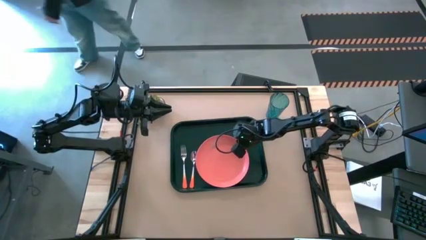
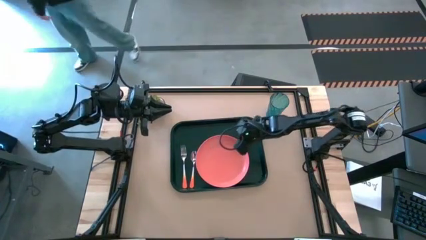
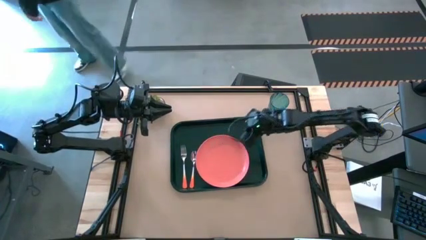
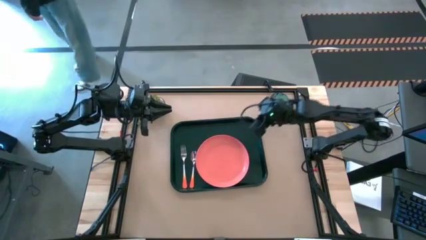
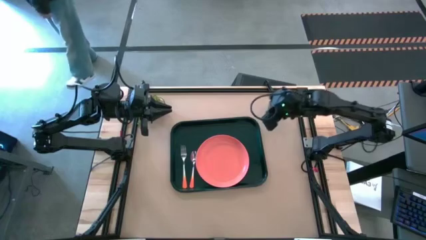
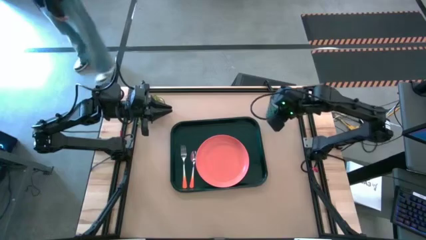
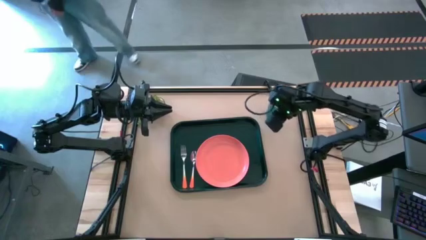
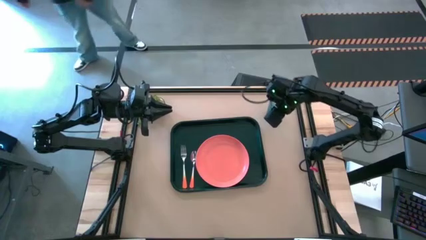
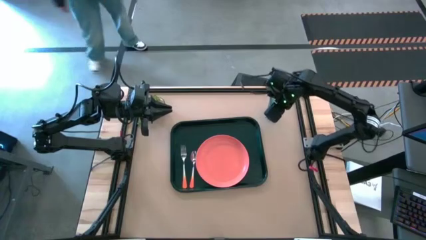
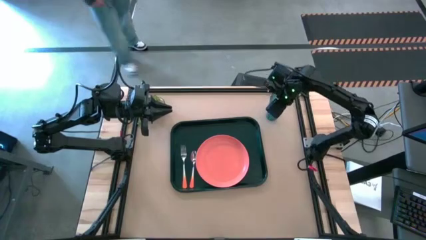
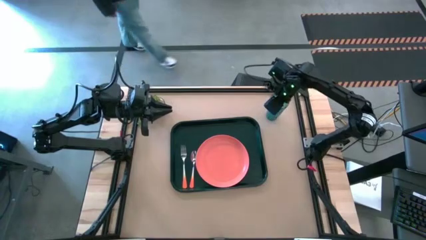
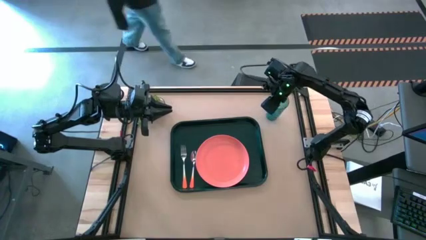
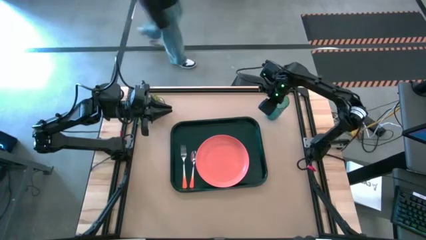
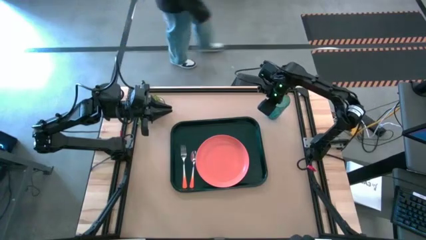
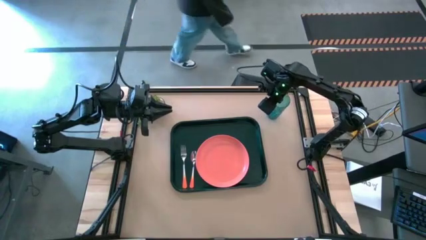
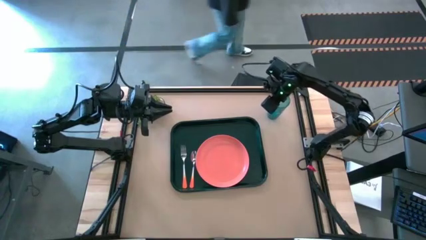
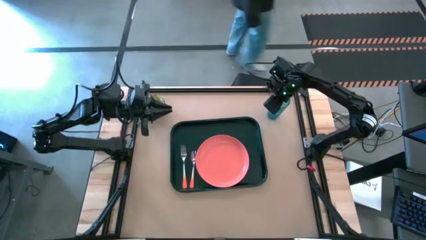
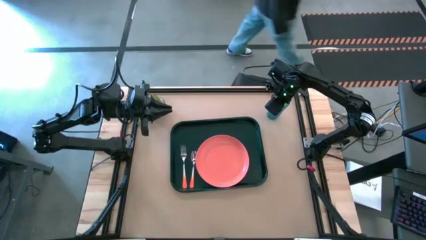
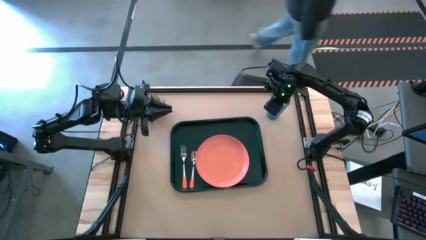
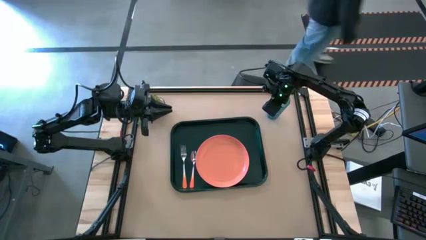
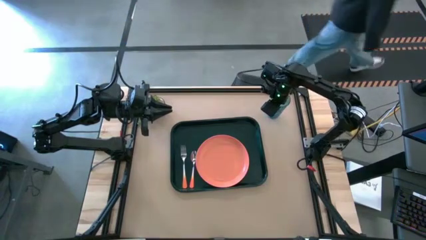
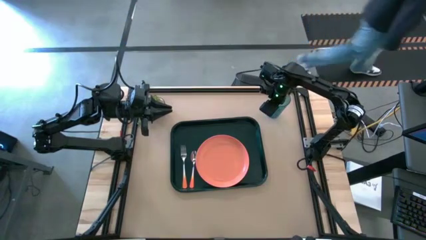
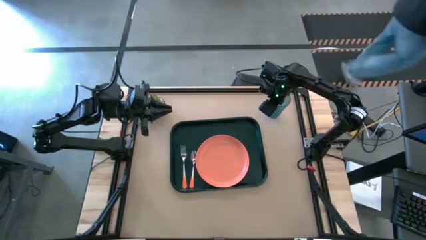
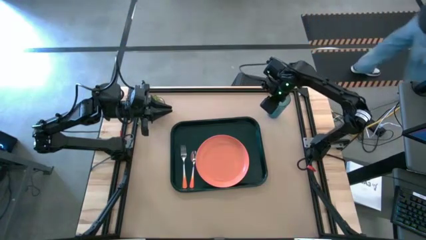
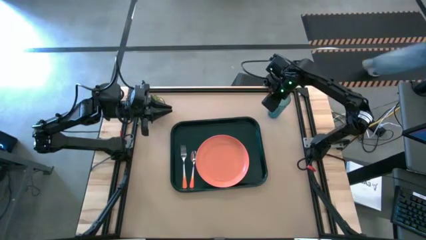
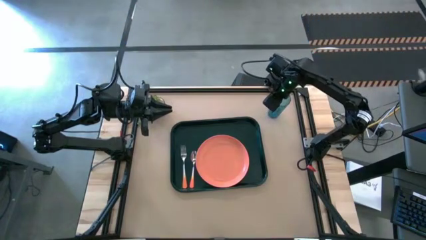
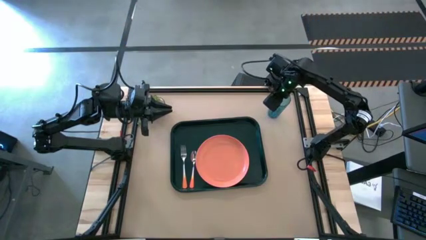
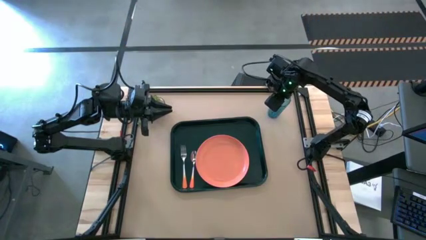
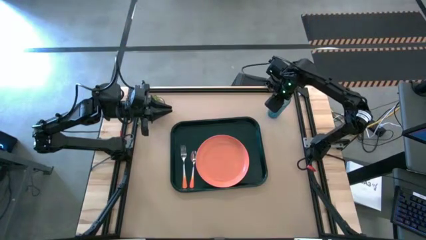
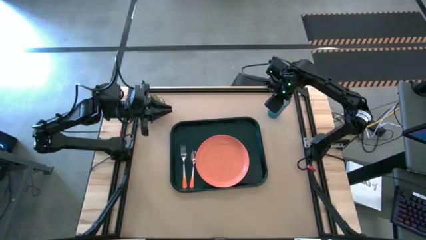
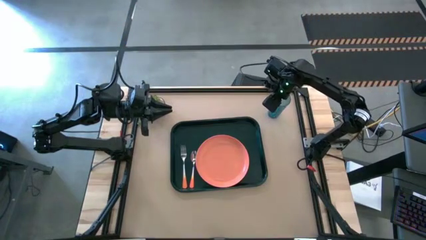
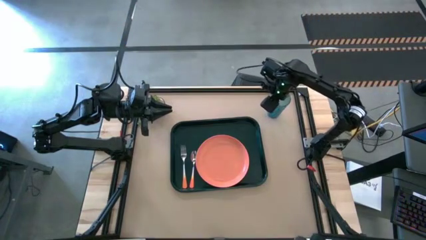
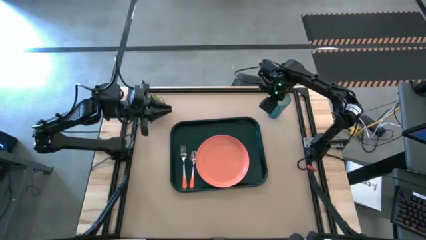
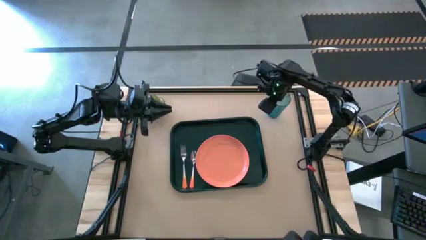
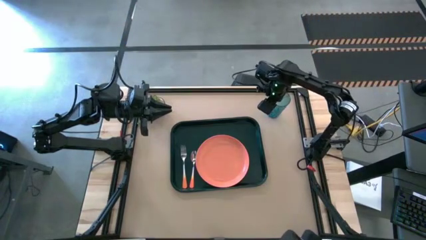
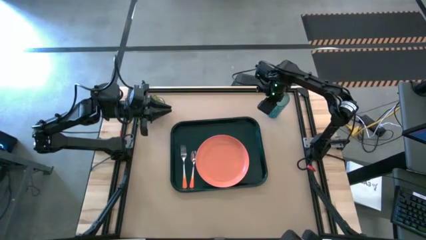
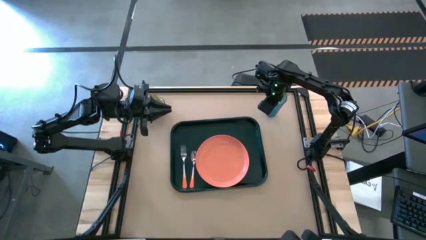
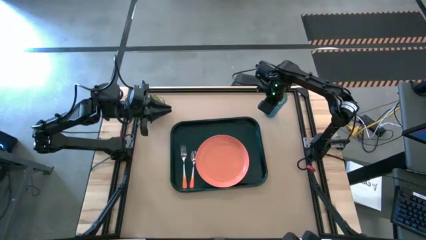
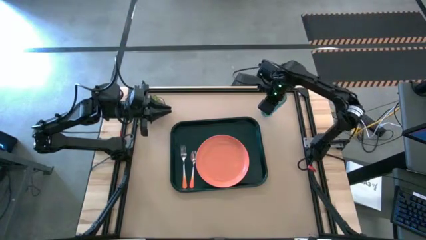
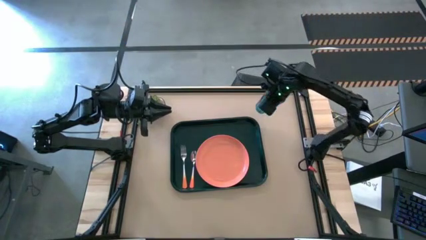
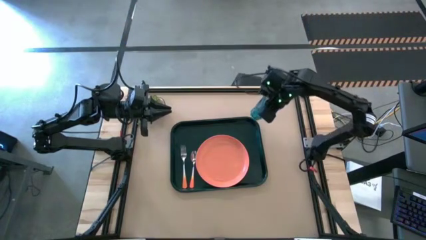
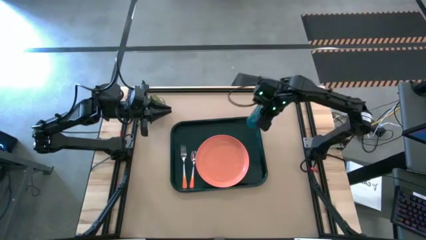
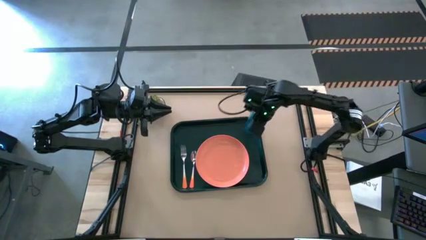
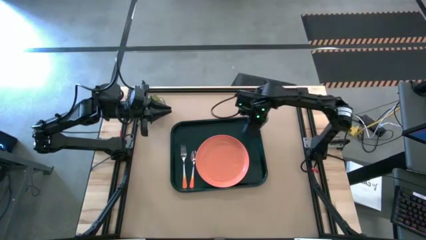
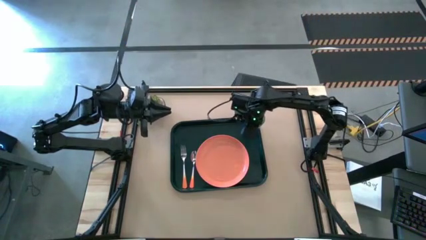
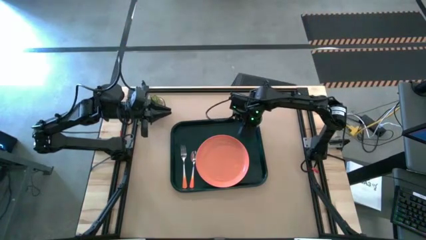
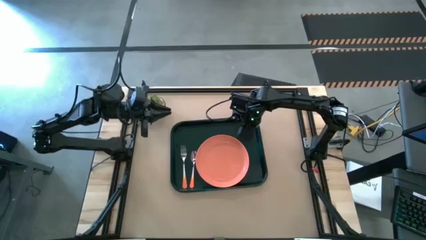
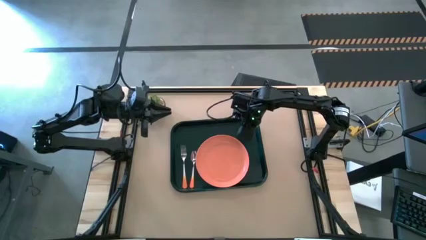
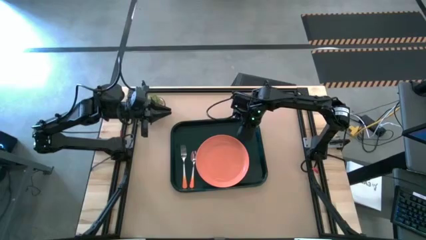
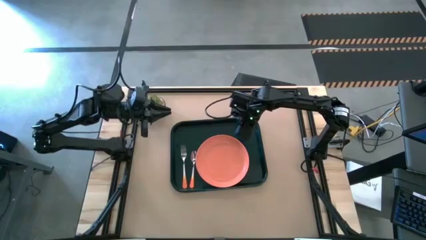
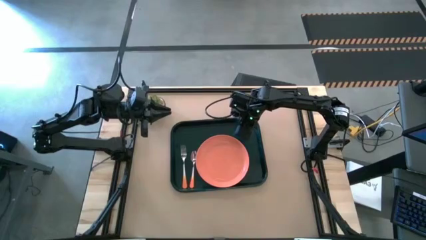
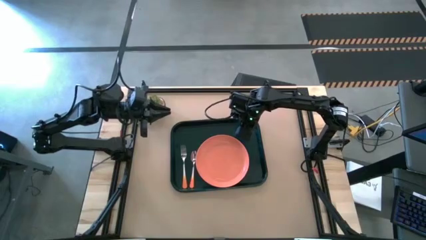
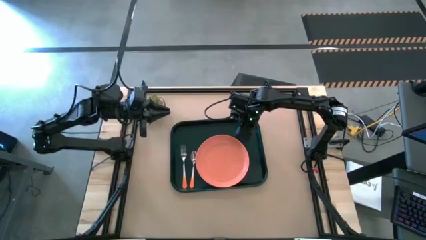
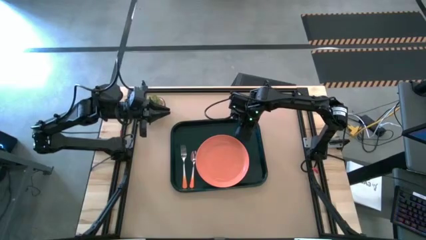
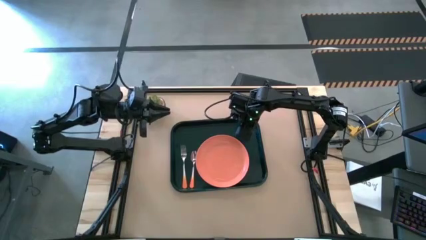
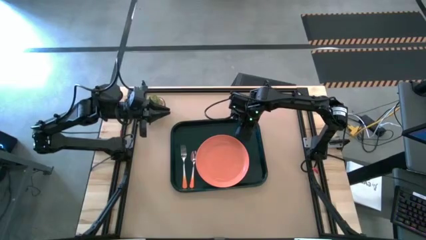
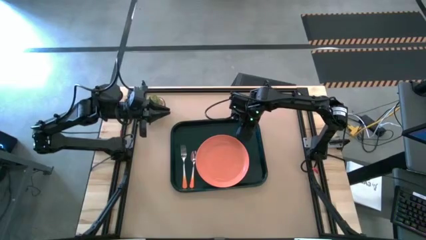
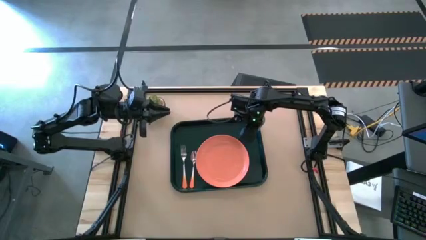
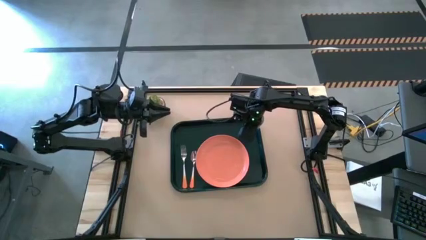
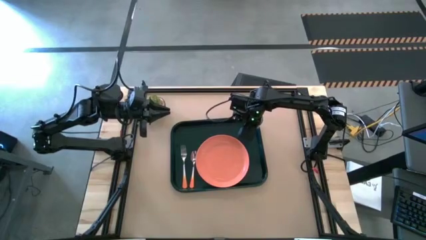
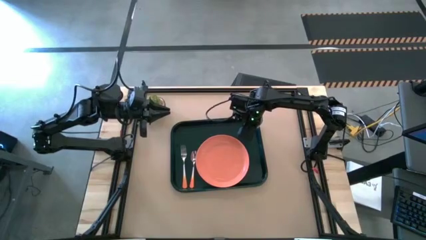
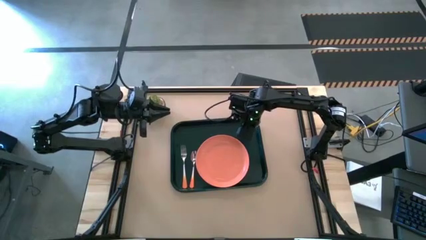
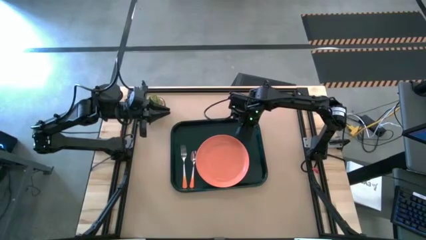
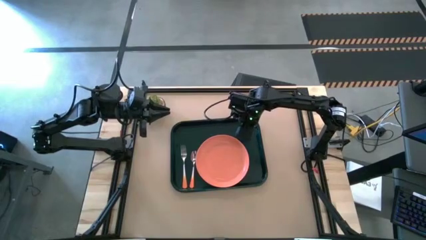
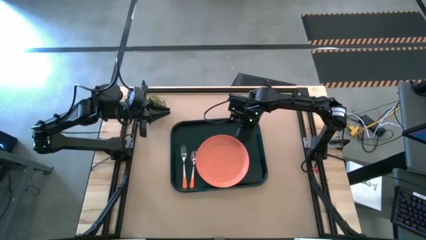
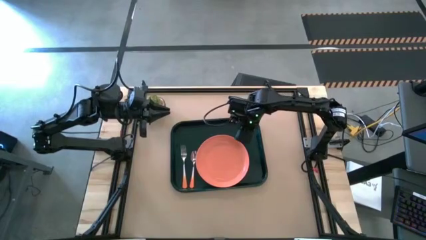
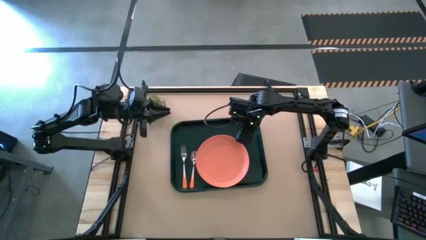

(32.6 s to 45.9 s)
Task: Pick and place plate/cup/fork/spoon on tray
Put the blue glass on the black serving tray to the top right of orange plate

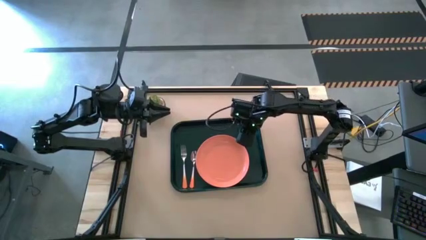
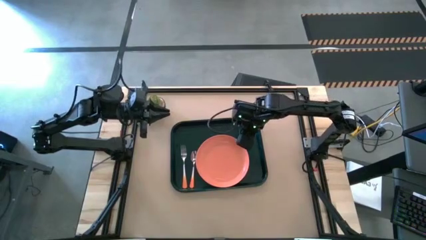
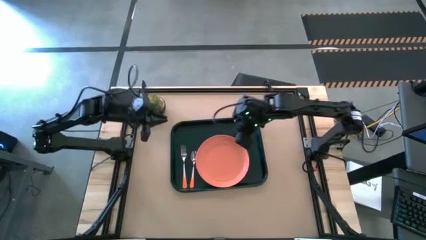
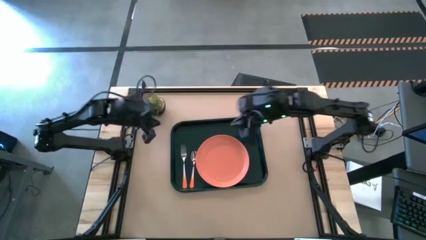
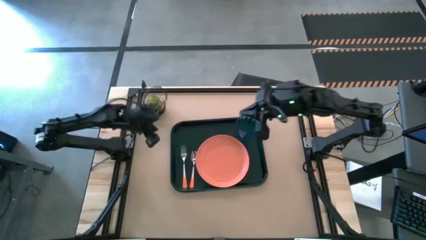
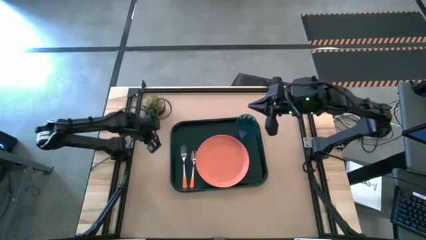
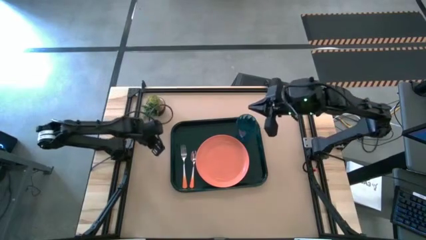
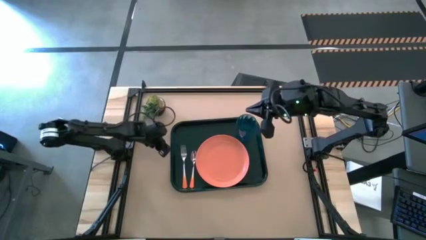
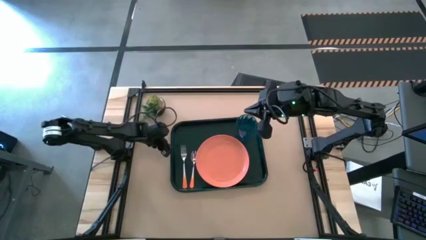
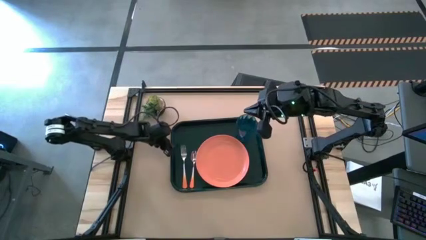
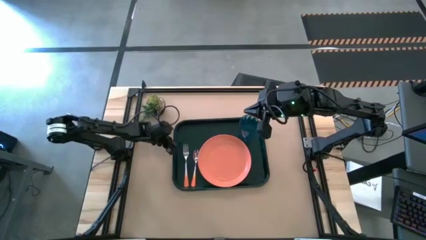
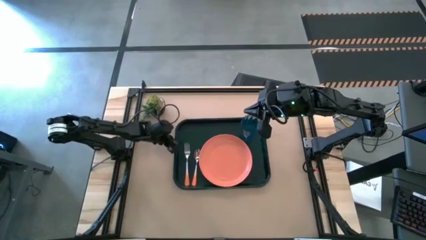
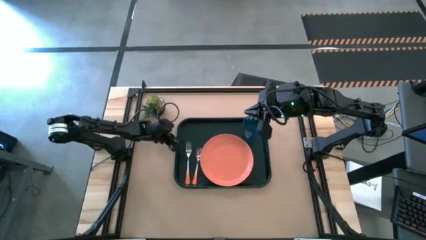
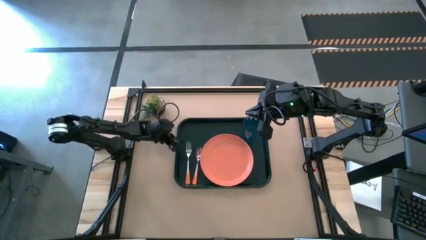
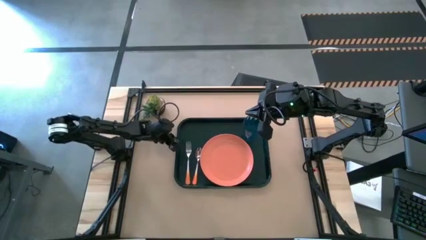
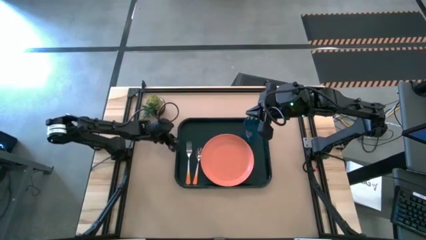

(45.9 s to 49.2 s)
Adjust the black serving tray
